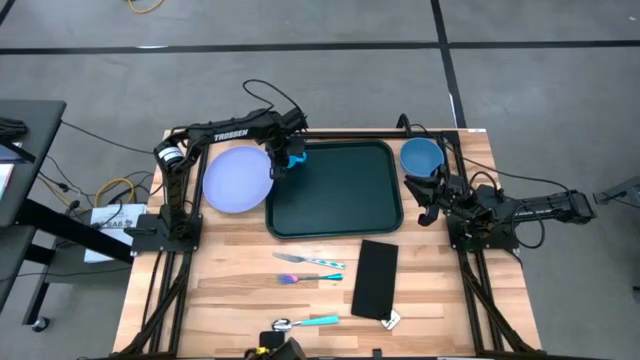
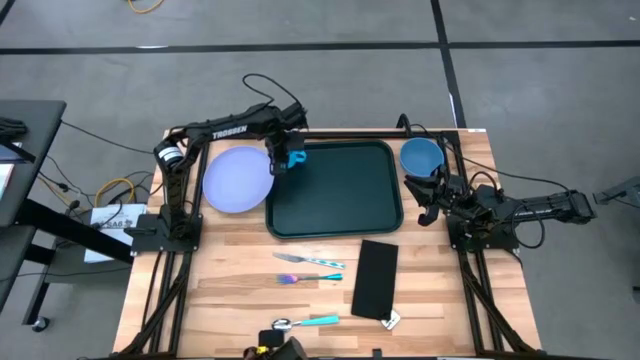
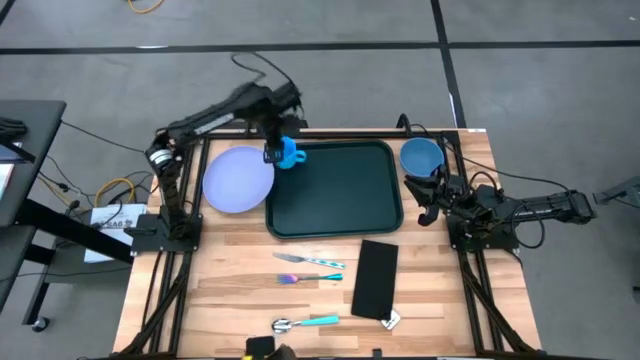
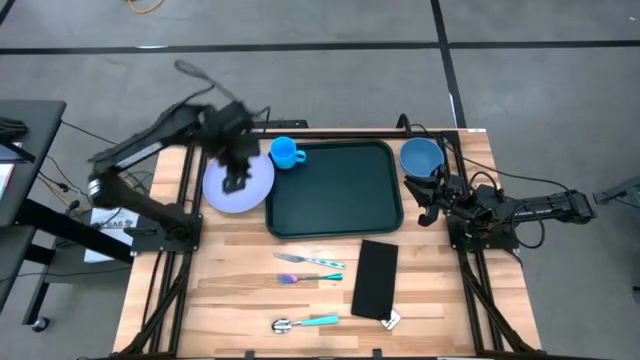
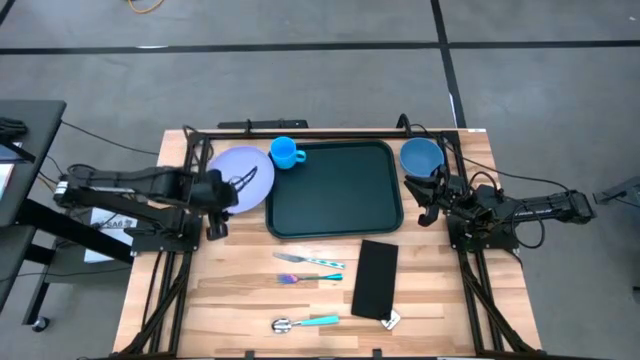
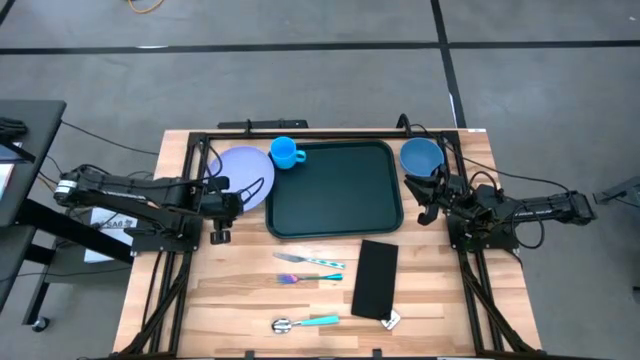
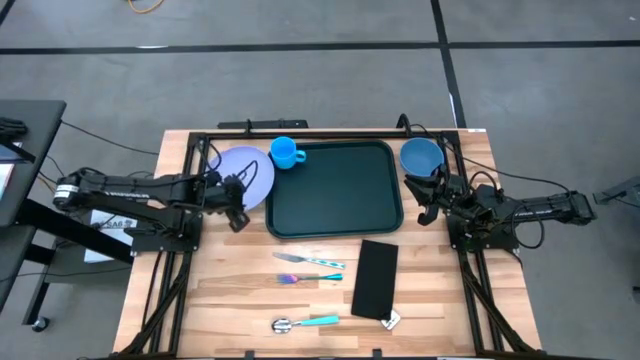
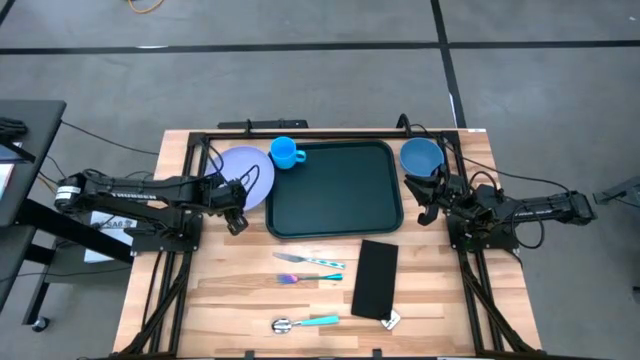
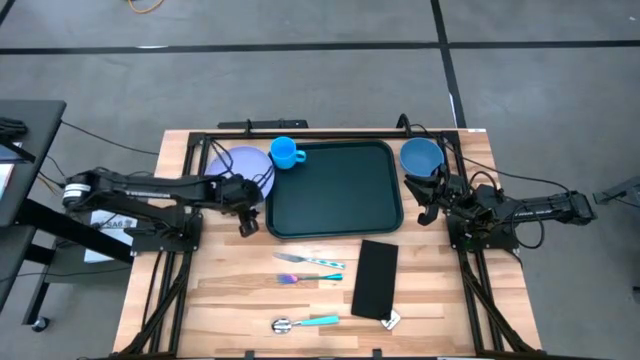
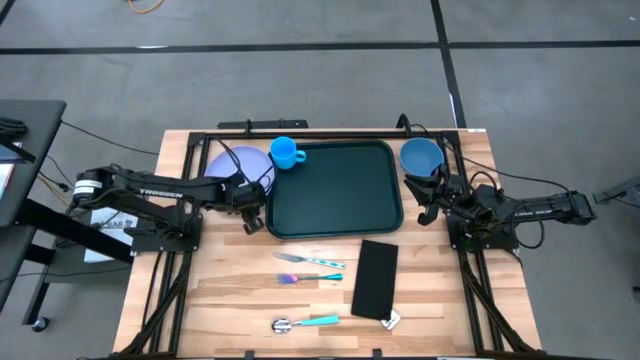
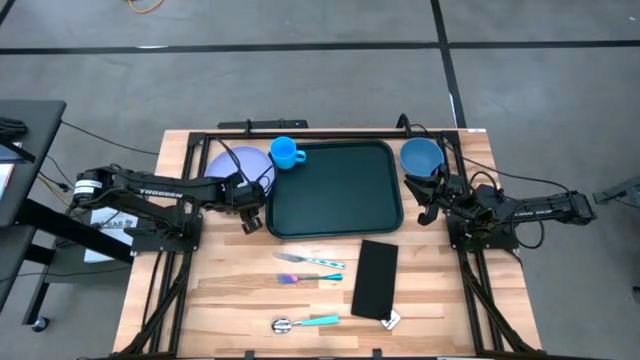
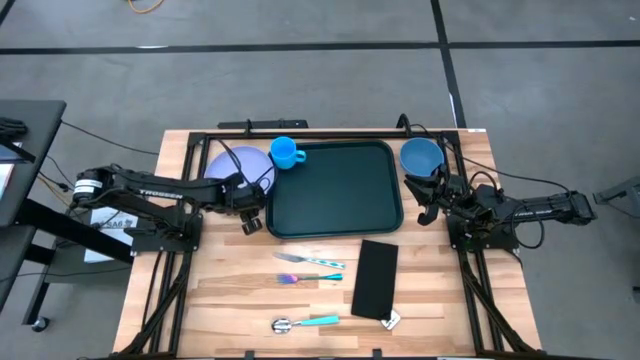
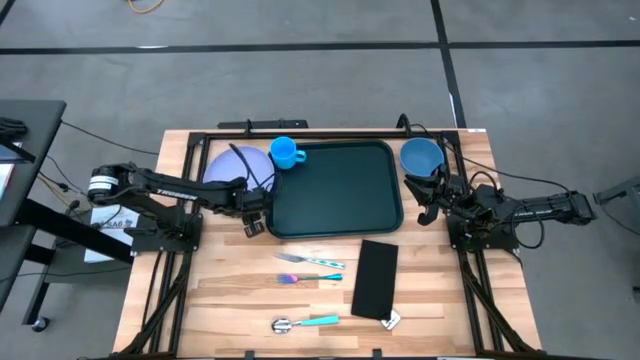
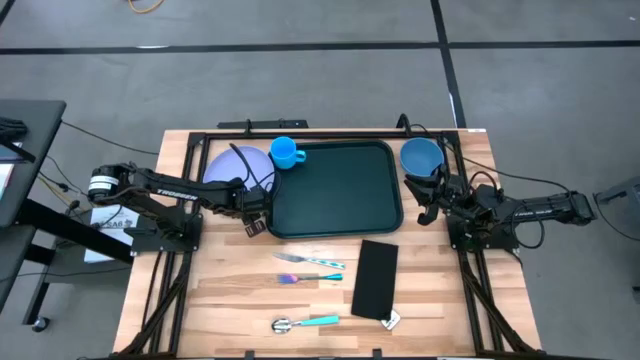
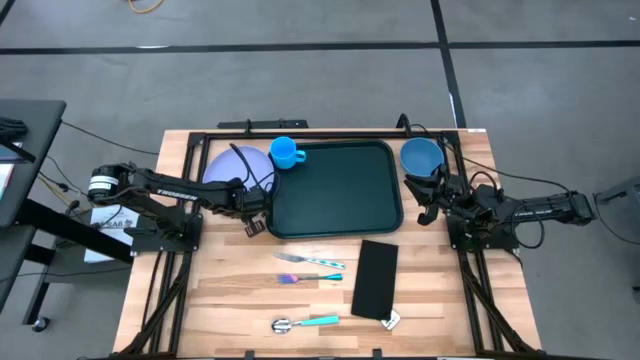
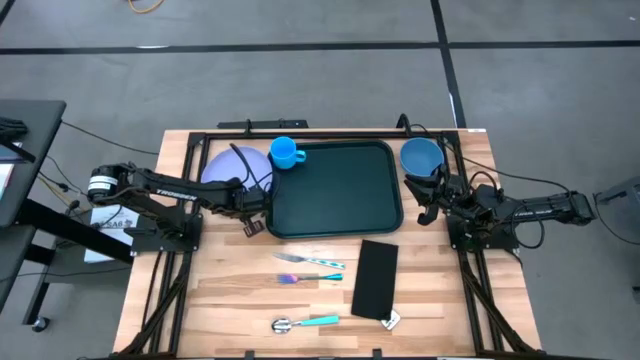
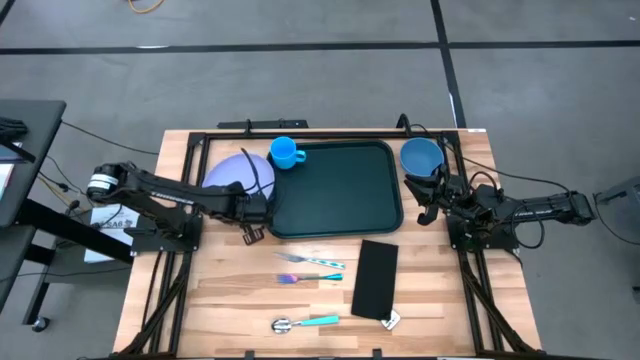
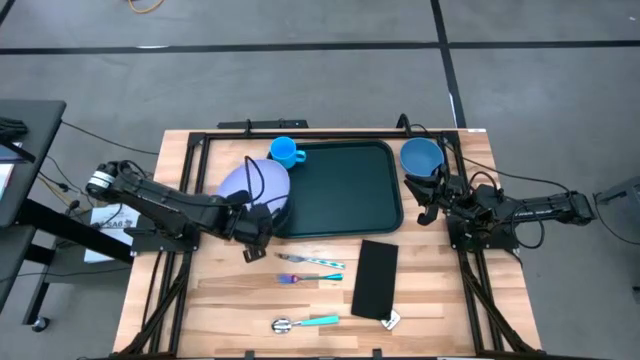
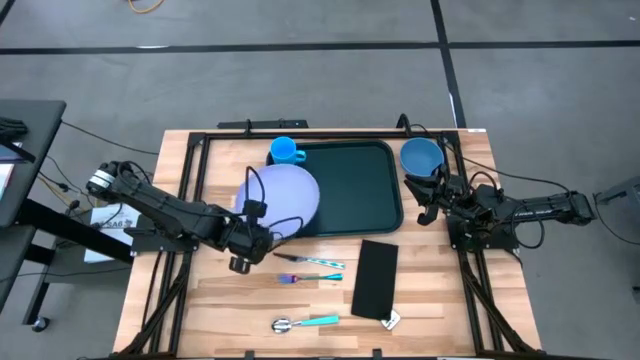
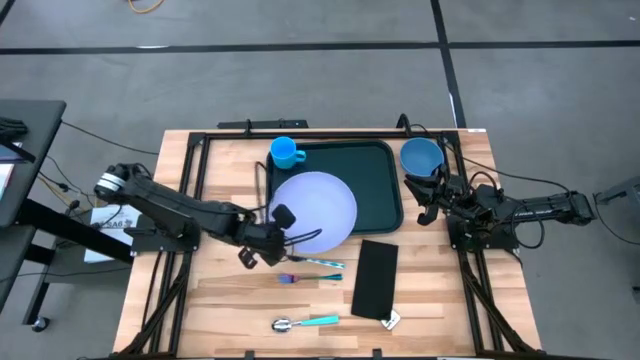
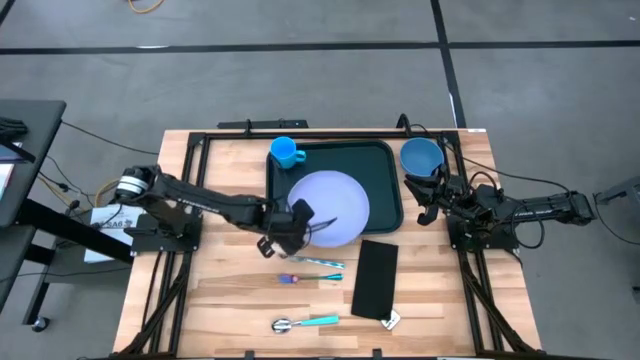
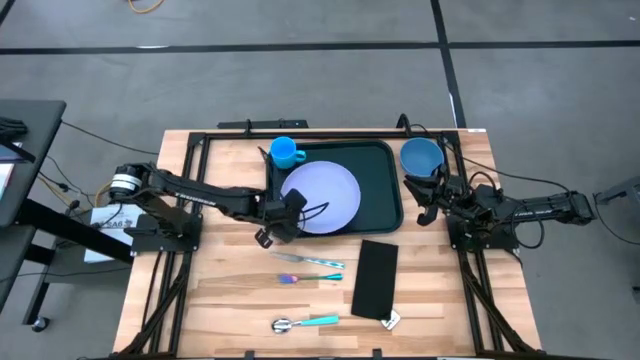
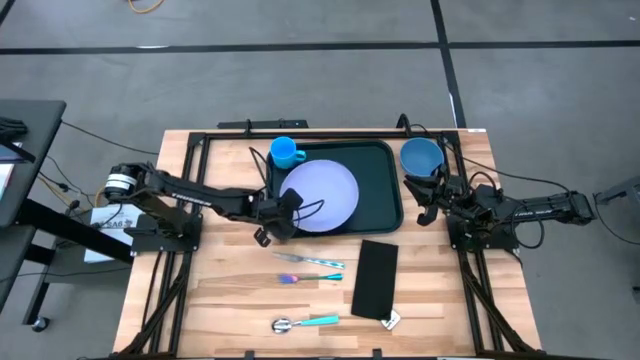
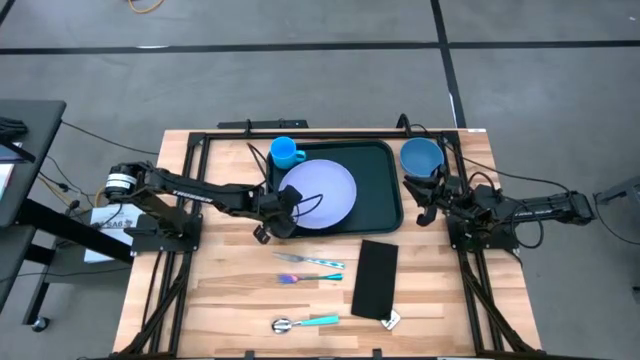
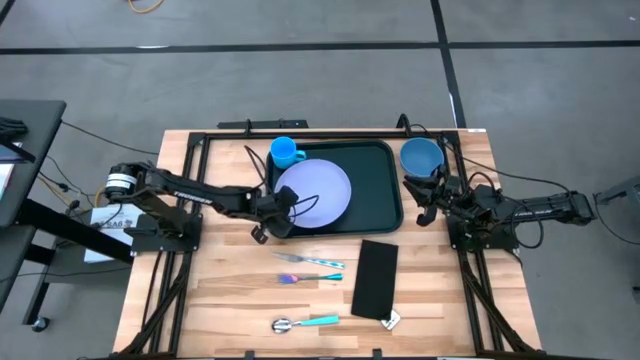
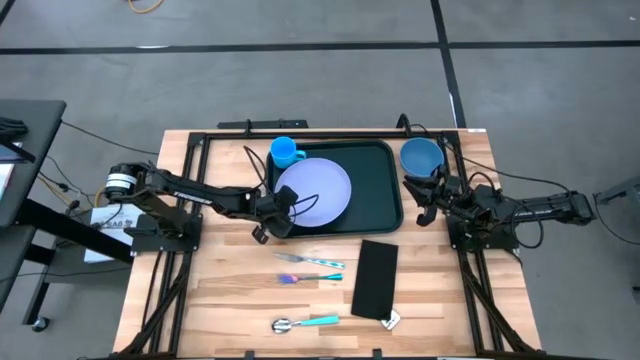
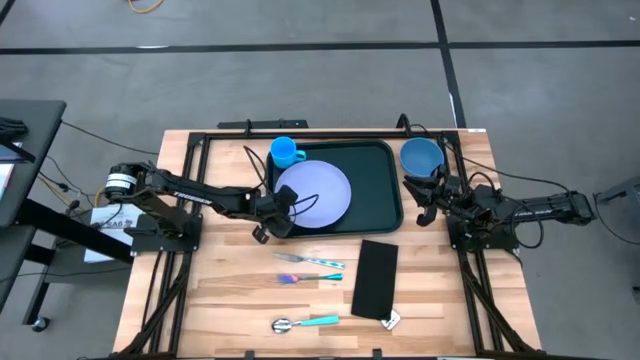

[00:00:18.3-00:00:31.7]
Task: Set up tray
Put the white plate on the black tray
